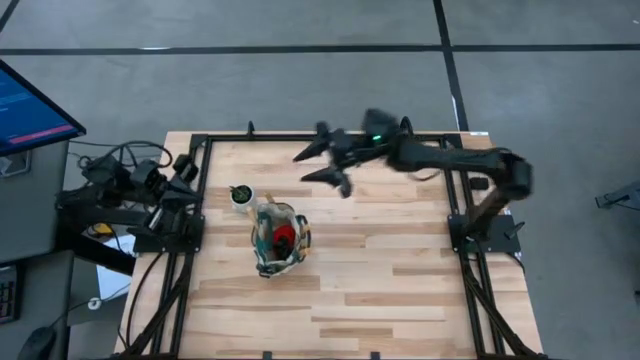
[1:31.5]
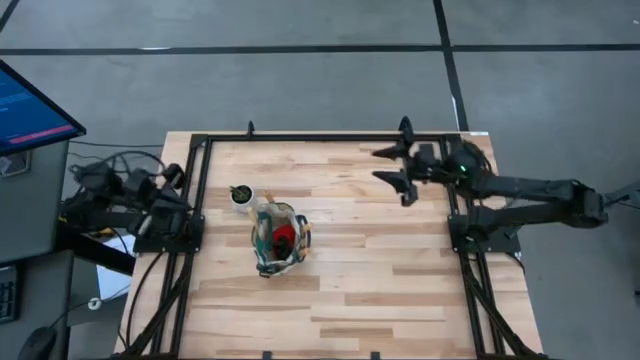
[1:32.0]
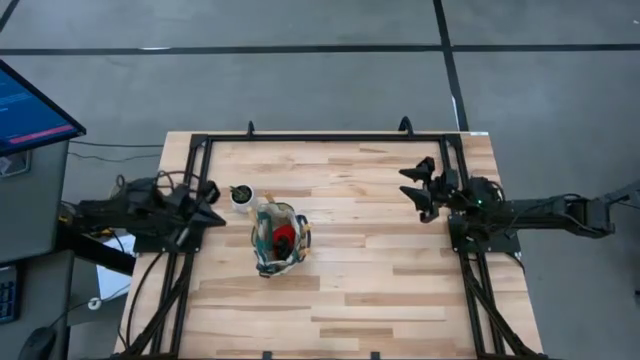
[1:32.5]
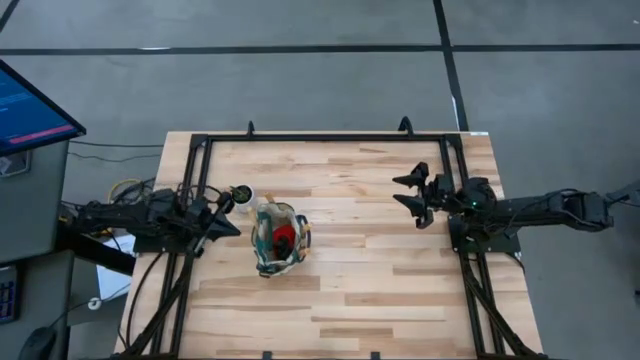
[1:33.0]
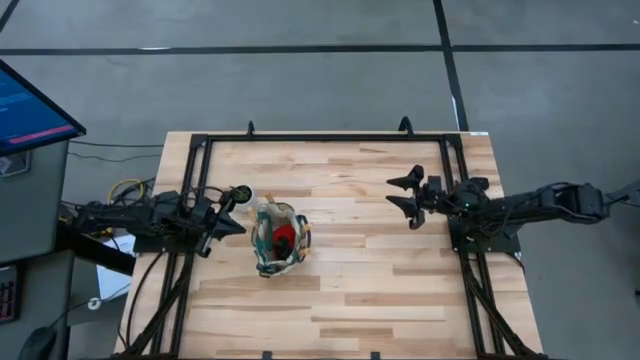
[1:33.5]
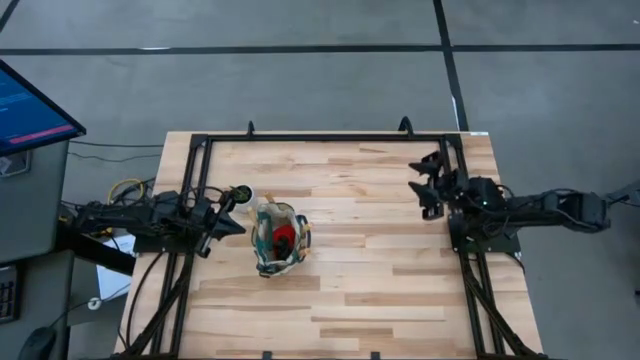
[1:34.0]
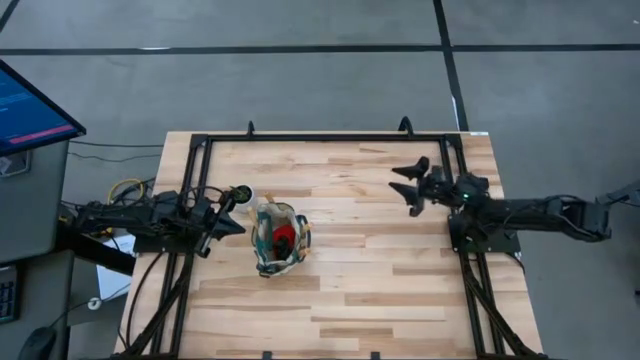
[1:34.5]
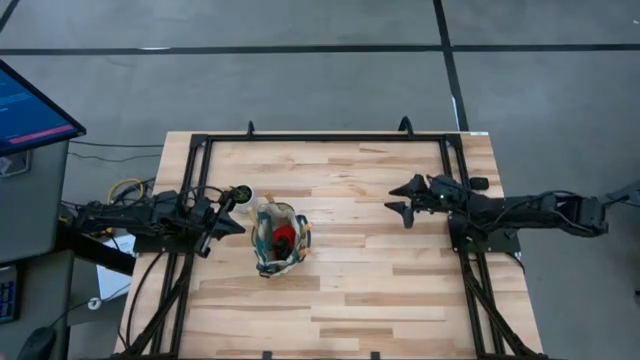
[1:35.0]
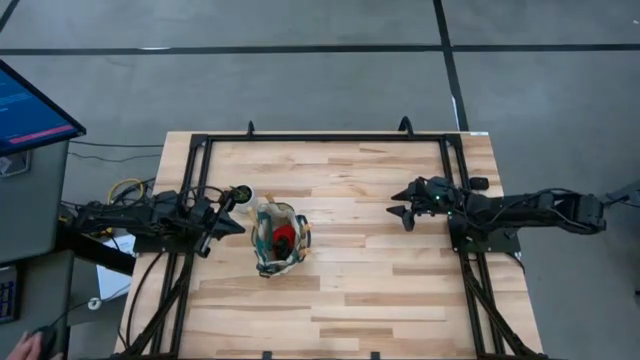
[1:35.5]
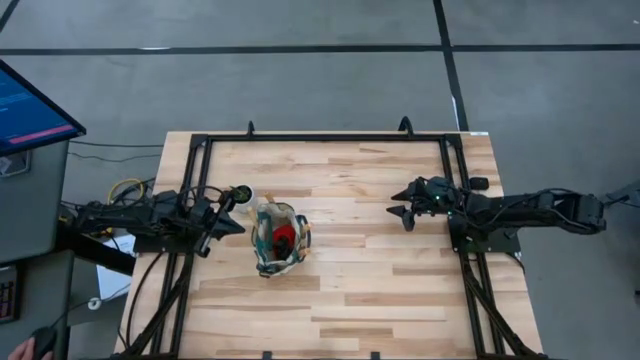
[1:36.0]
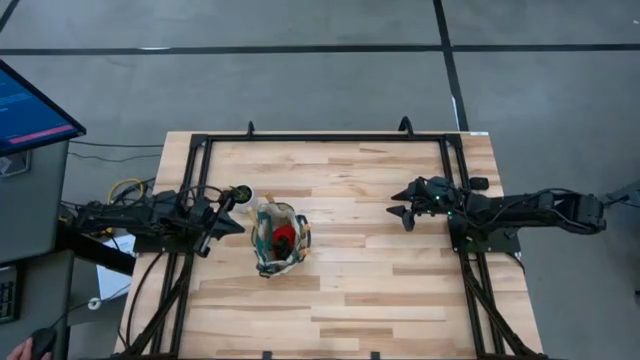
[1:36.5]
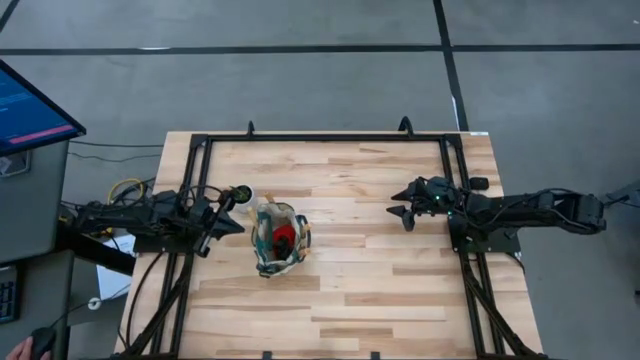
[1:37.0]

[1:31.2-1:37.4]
Task: Pick & Place Garden tools in Gardening bag
Return to Home Position

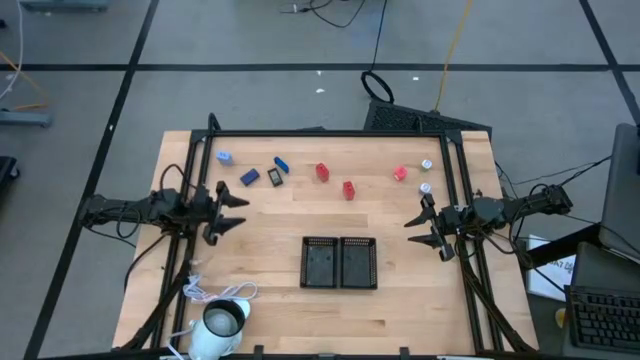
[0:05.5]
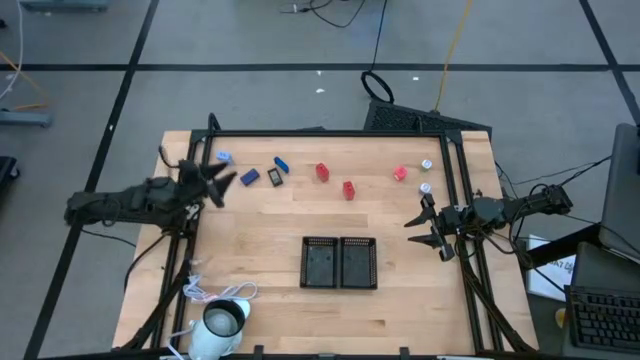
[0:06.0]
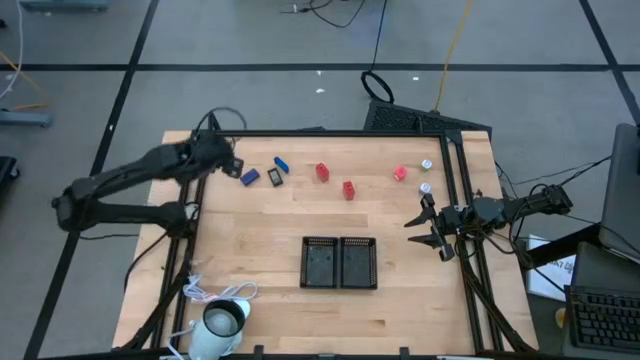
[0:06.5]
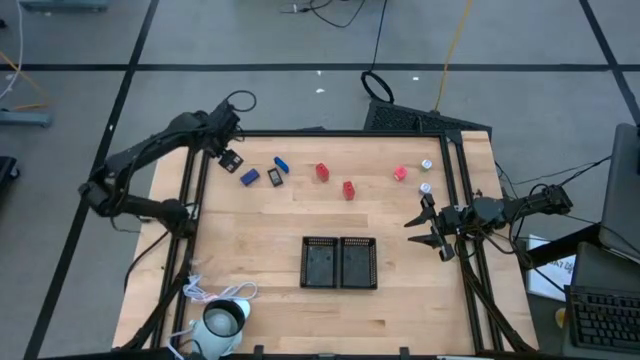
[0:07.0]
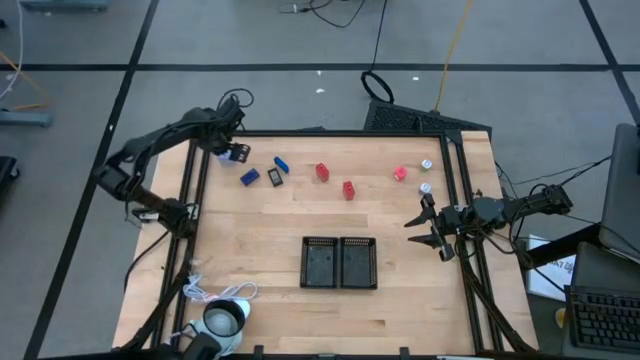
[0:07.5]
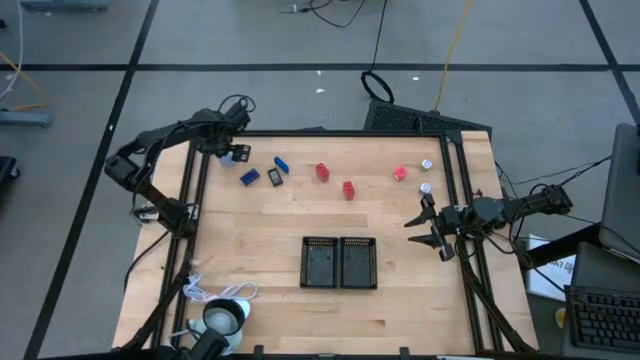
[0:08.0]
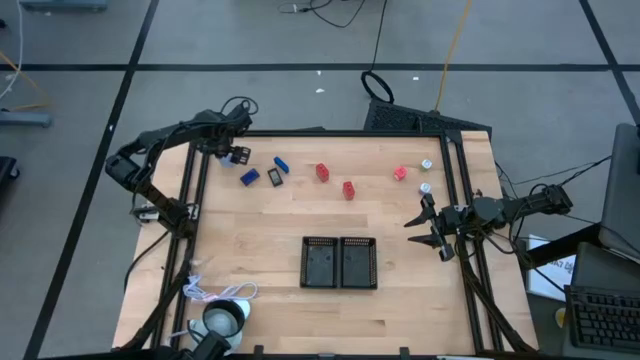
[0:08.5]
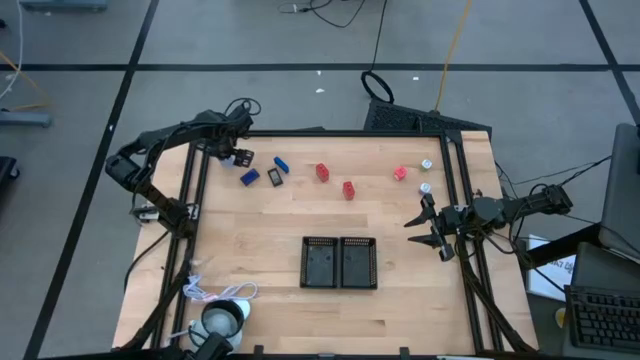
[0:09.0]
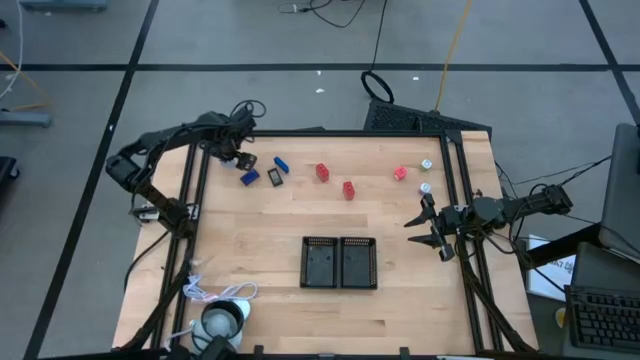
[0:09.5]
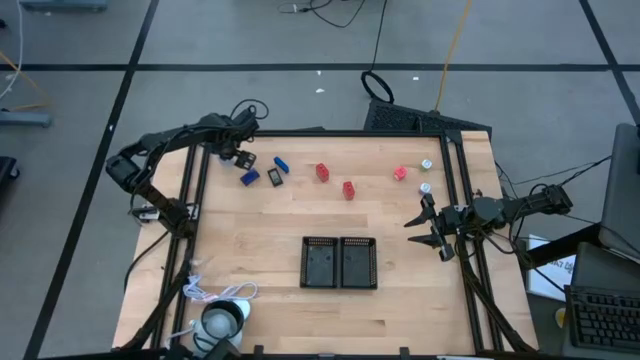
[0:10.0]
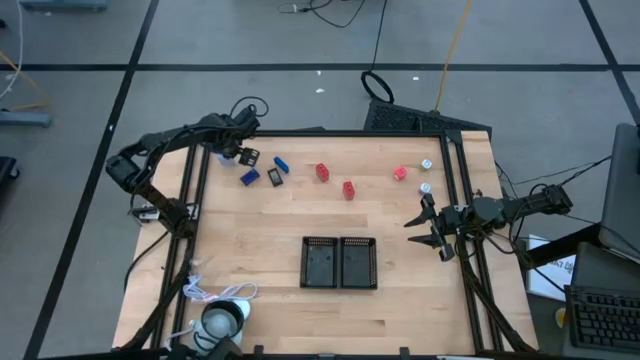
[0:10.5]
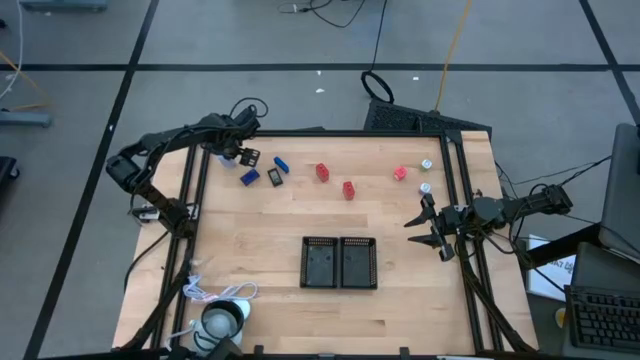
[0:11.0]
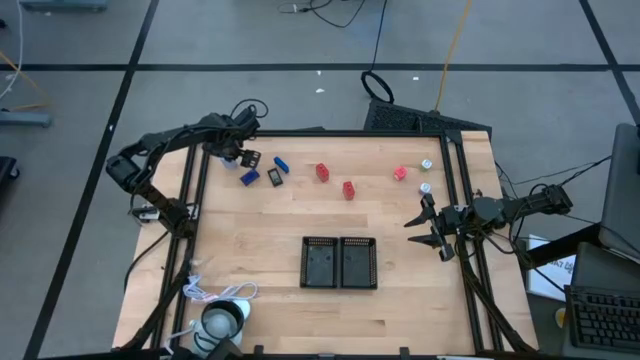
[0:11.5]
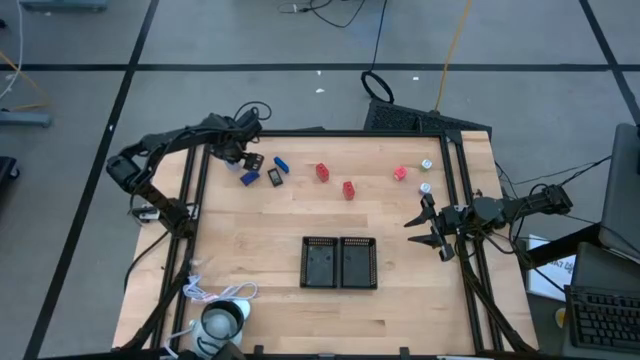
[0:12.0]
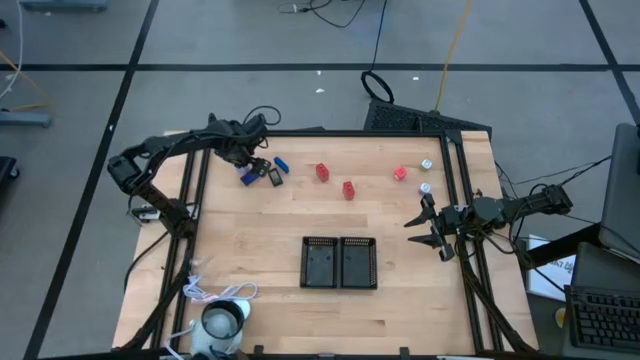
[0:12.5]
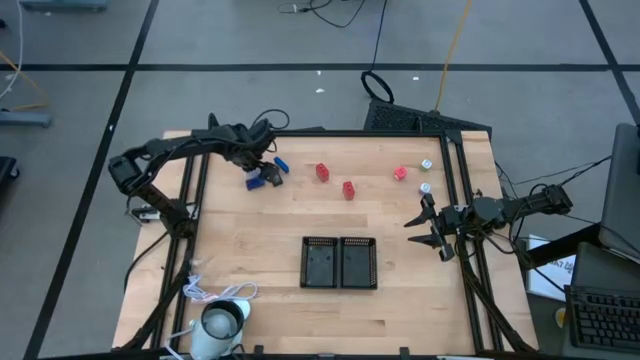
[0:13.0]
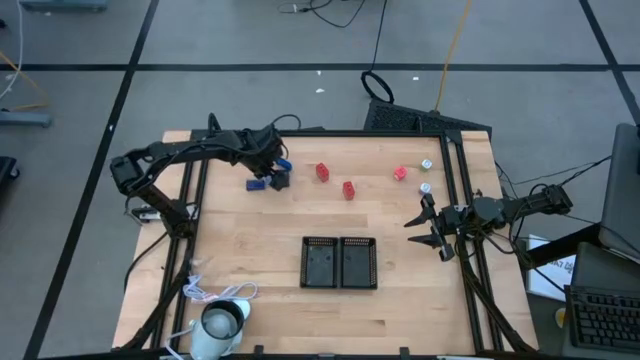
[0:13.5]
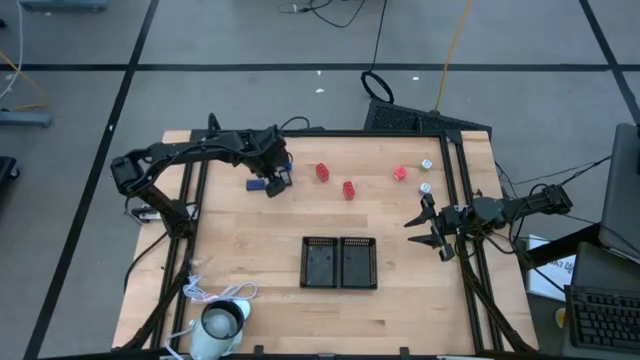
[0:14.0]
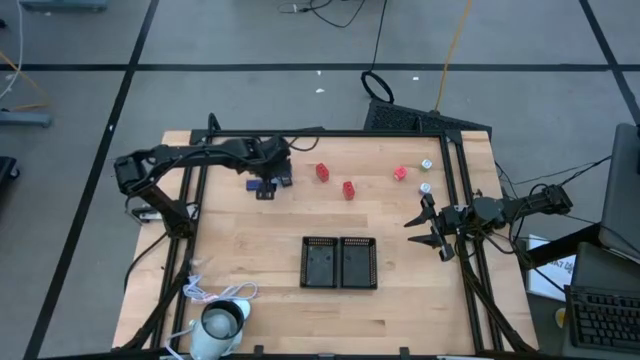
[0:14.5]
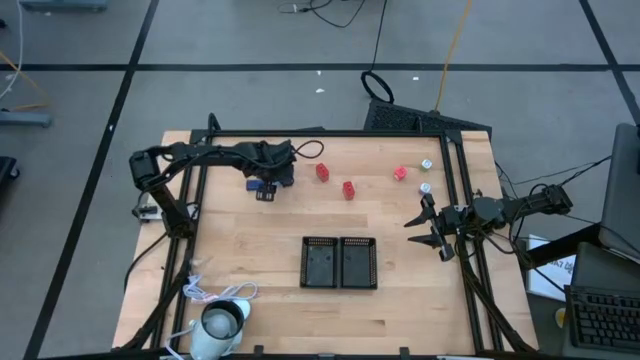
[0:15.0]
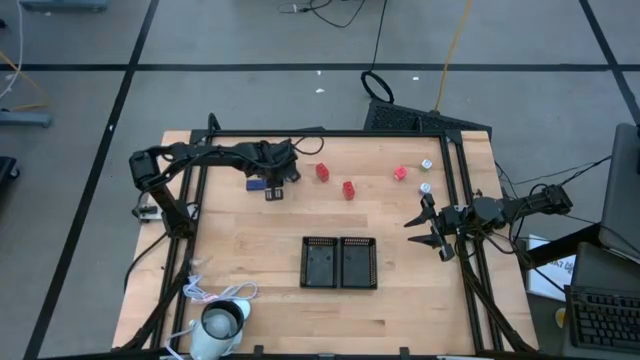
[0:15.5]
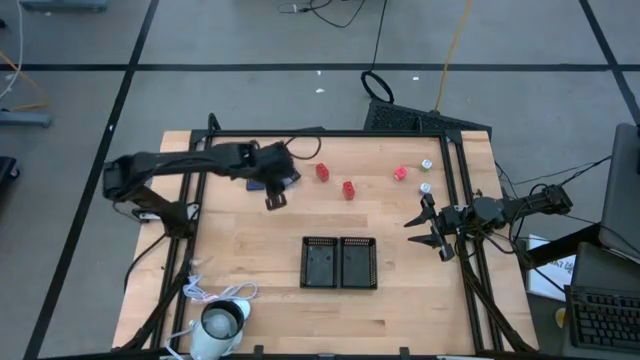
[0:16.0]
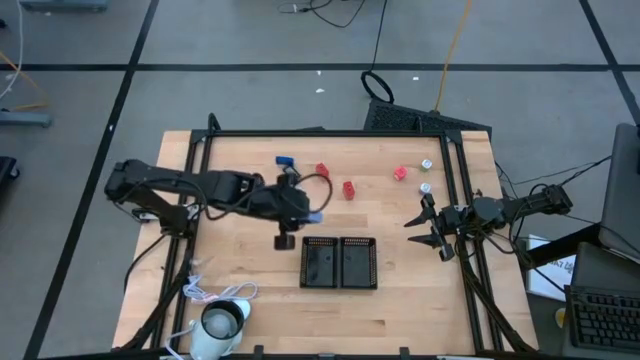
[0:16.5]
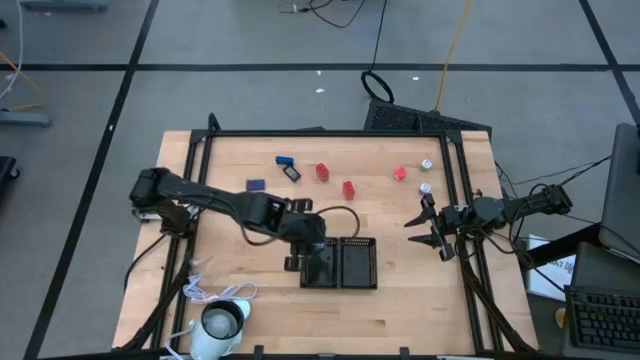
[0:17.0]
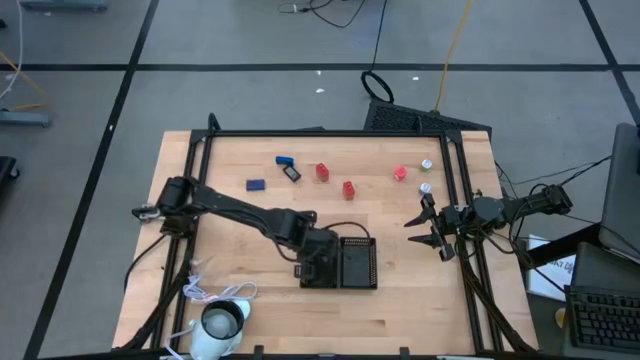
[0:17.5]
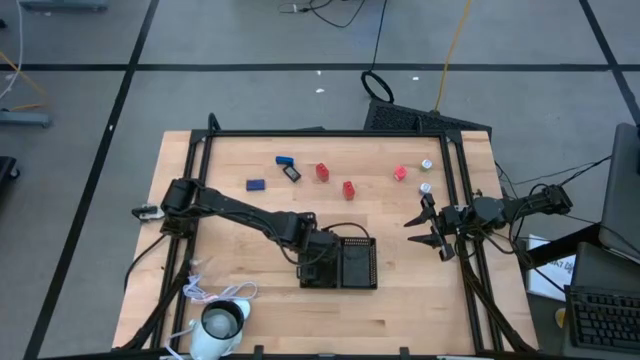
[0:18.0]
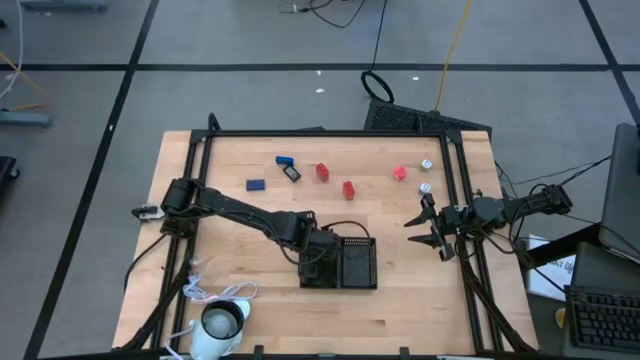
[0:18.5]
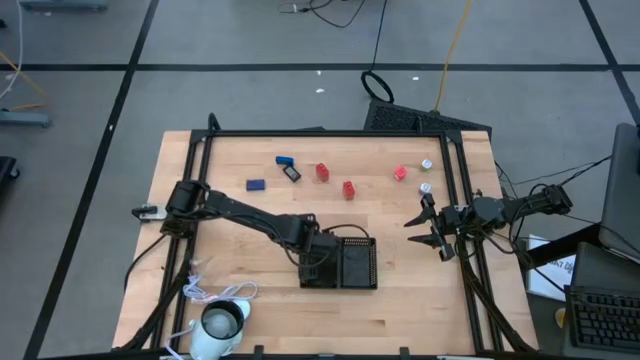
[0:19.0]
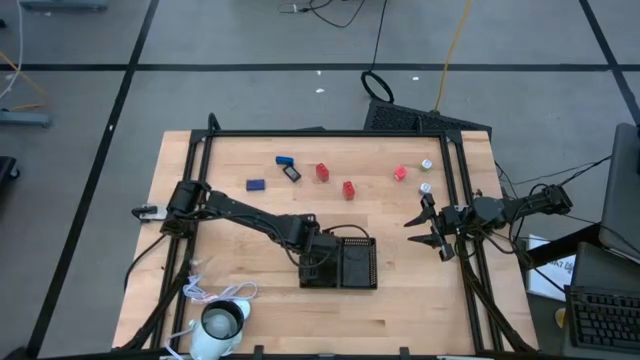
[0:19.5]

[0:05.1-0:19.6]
Task: Pick & Place Office items
Put the light blue charger adapter into the left black basket
